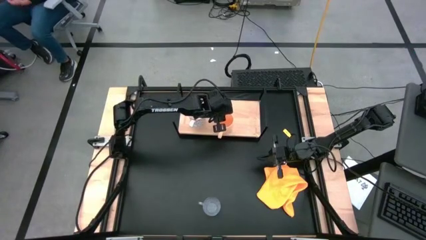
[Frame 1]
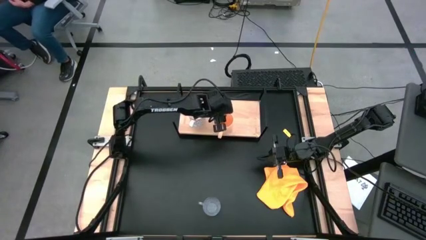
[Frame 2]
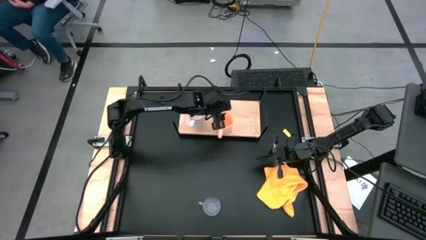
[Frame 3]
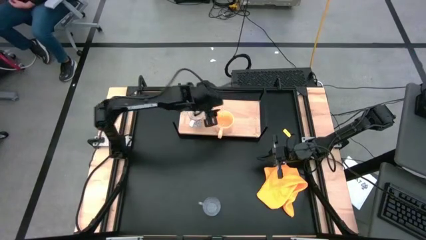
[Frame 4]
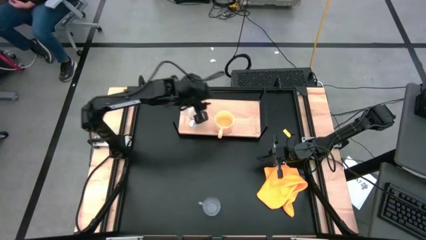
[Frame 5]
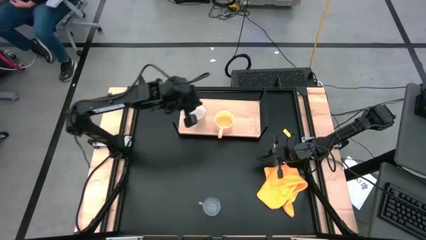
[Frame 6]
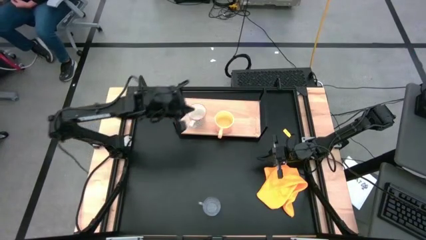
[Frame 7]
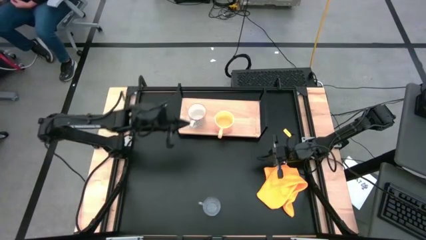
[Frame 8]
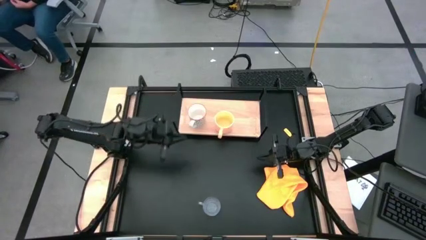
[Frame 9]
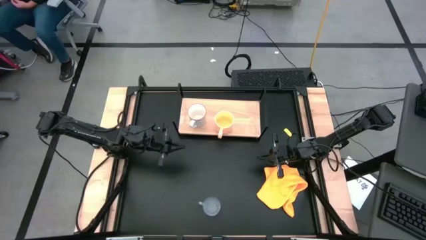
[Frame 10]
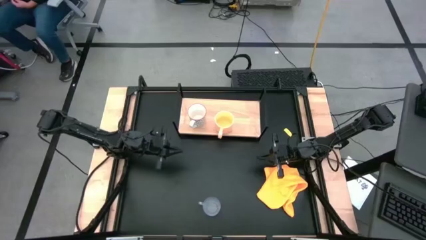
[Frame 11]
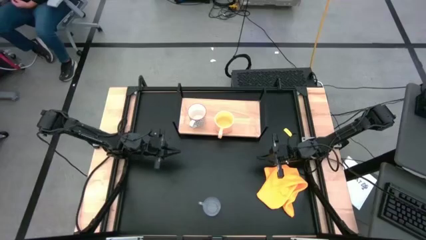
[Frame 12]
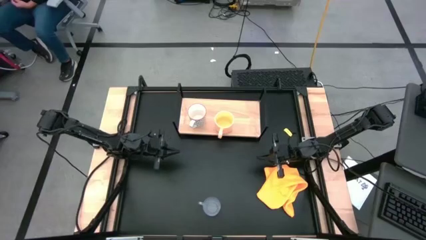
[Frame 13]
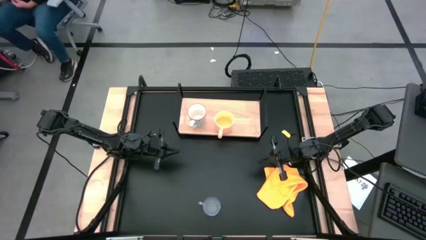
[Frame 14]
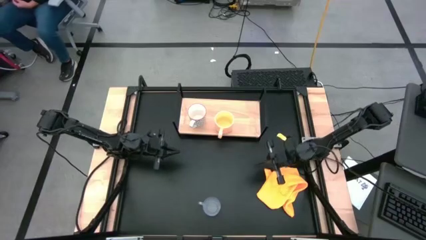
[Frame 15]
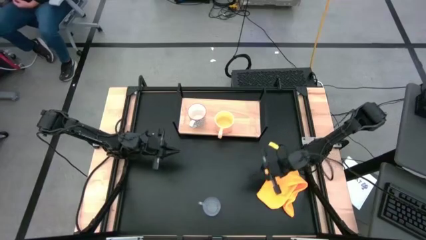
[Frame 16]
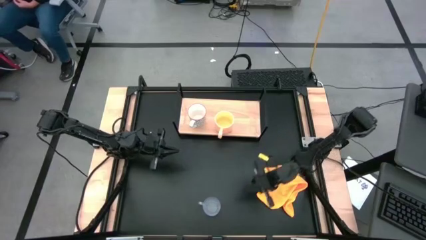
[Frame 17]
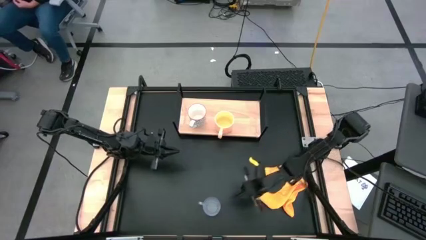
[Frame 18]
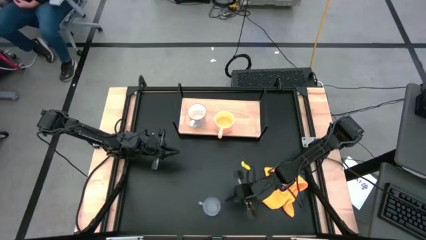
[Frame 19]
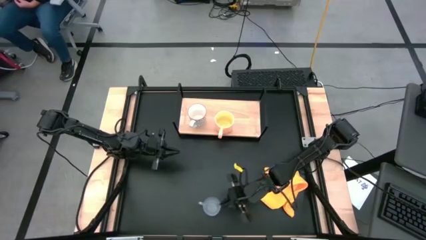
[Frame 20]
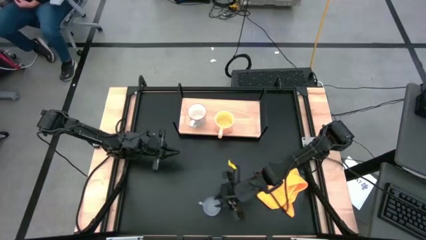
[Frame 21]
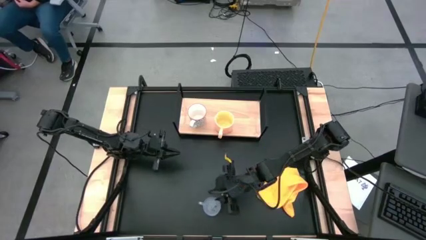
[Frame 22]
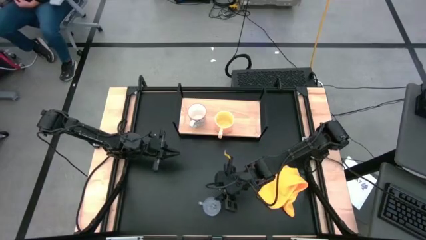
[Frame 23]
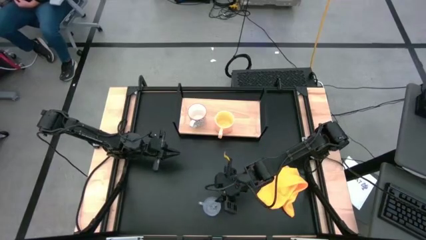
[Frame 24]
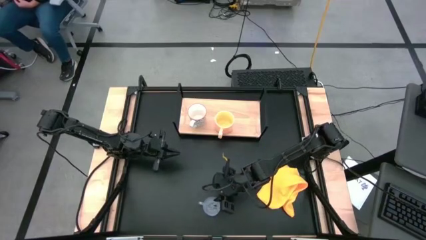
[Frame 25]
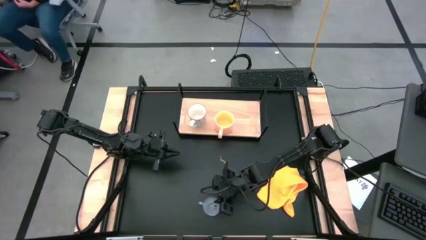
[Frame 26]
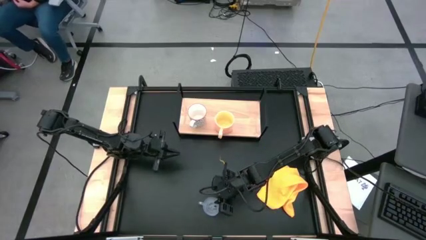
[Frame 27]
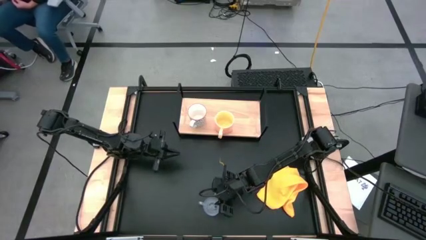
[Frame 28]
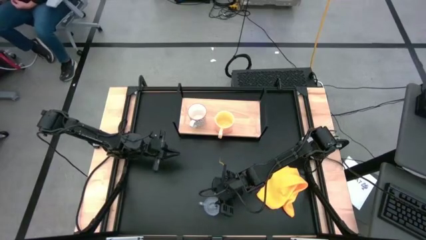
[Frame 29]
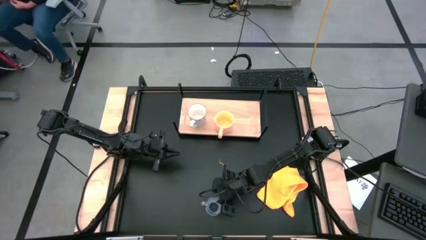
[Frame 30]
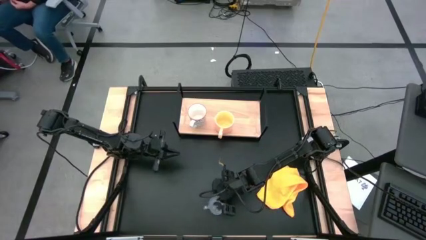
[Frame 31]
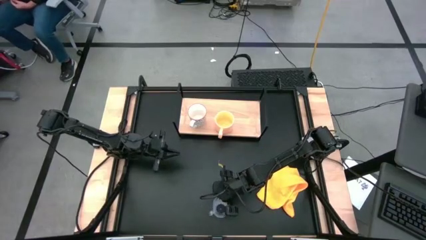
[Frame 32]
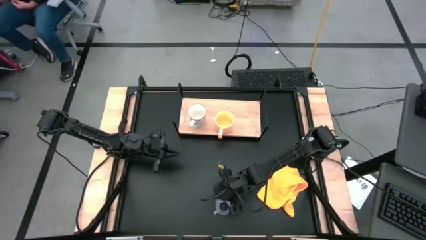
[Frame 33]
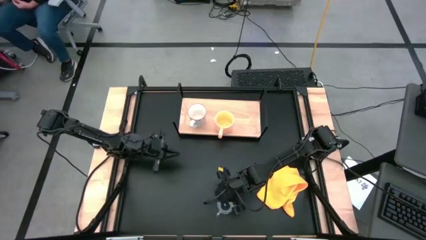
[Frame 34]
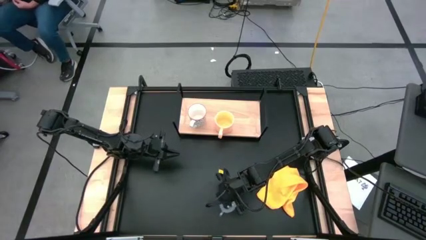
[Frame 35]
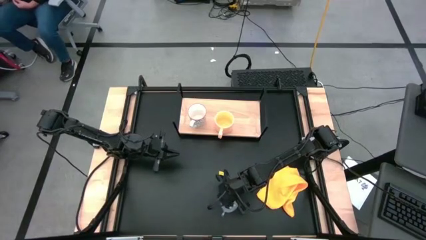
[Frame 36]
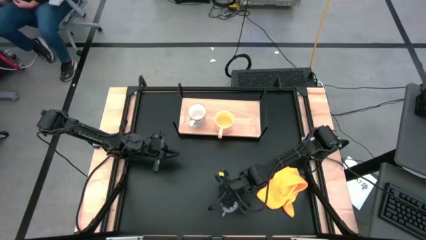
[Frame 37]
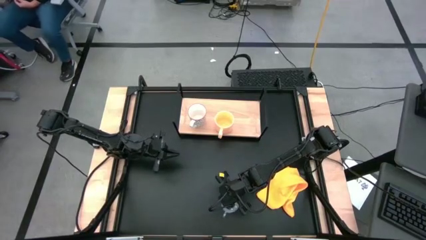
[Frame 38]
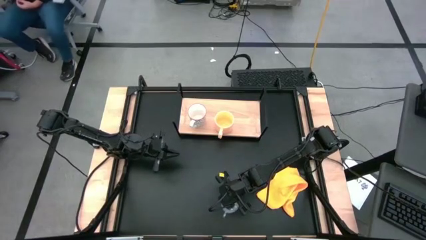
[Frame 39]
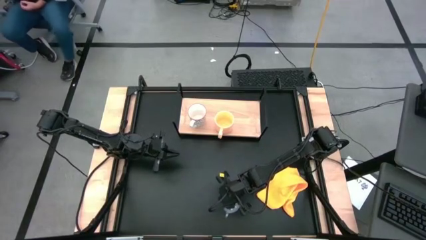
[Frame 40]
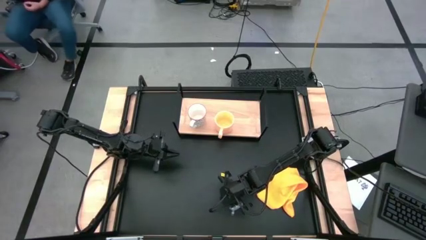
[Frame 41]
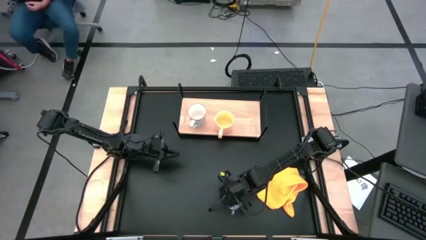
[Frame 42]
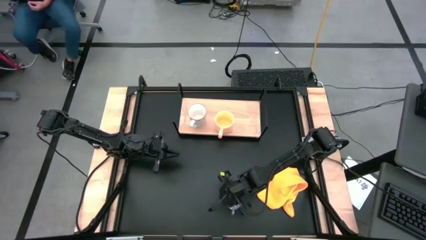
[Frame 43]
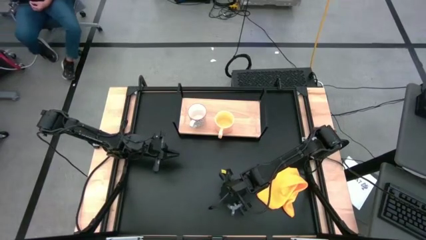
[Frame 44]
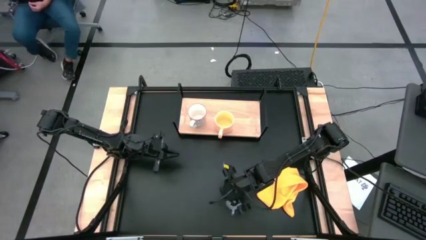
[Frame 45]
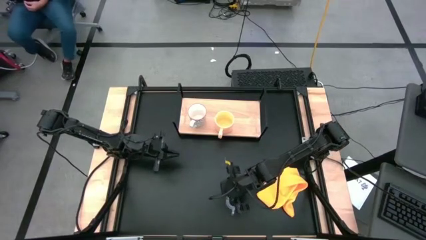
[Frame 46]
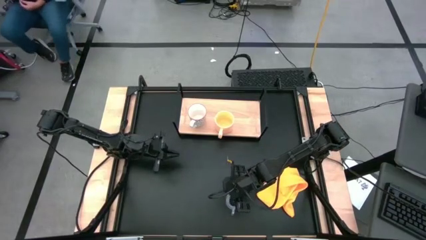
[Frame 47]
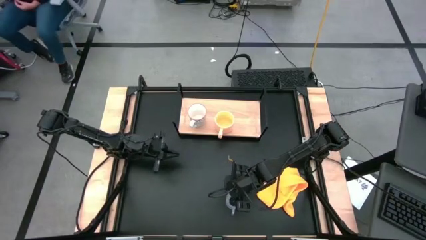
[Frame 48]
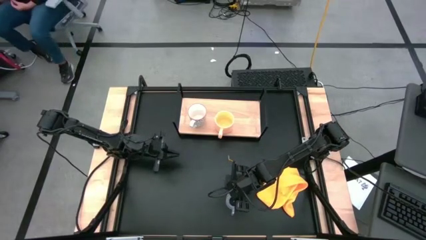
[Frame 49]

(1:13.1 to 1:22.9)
Task: Stack small to large cups/mugs on shelf
Put the transparent mug on the shelf

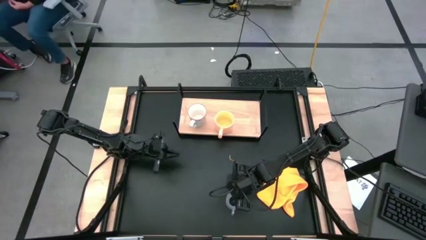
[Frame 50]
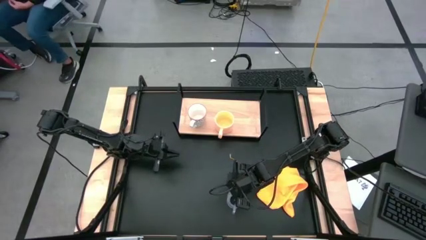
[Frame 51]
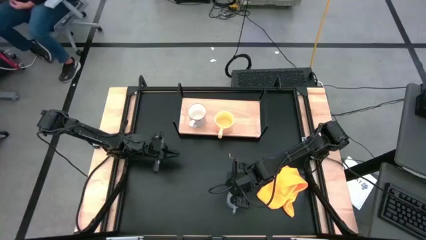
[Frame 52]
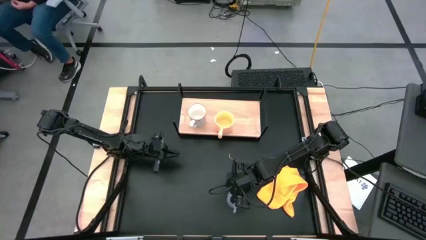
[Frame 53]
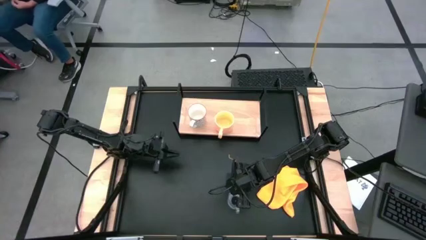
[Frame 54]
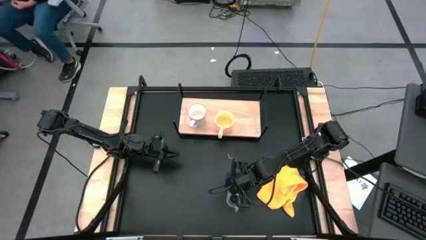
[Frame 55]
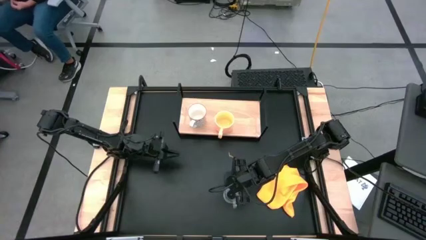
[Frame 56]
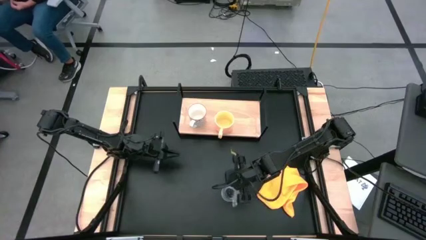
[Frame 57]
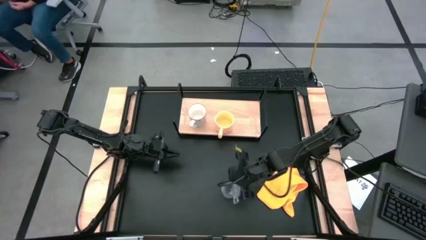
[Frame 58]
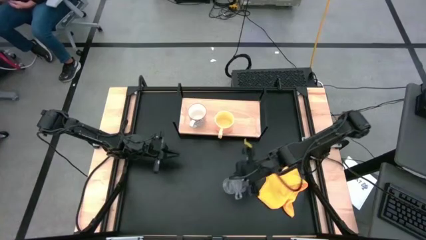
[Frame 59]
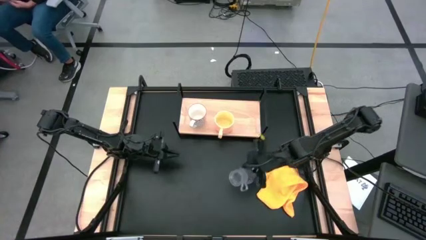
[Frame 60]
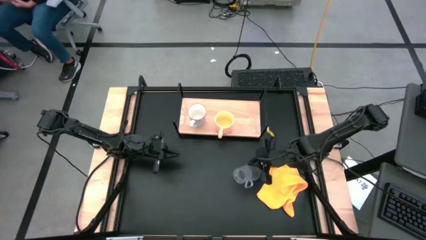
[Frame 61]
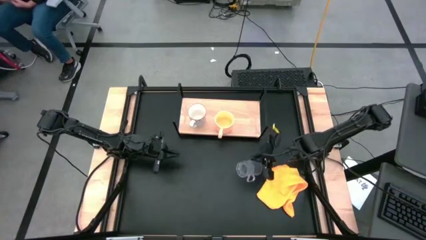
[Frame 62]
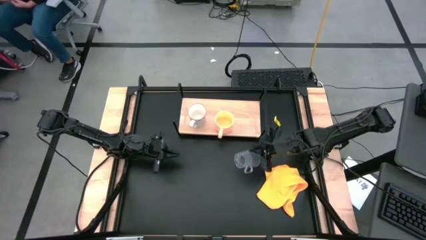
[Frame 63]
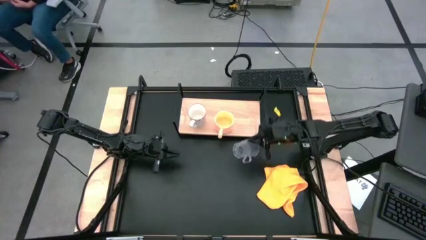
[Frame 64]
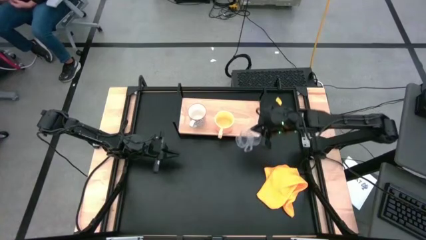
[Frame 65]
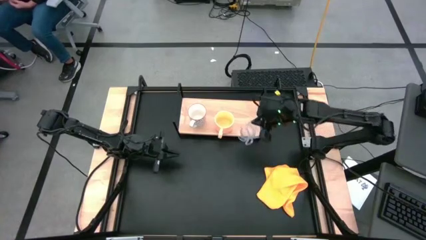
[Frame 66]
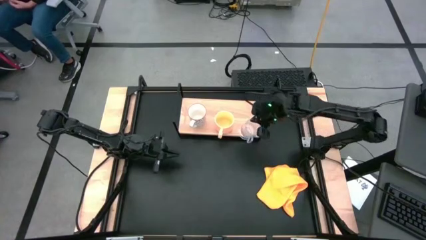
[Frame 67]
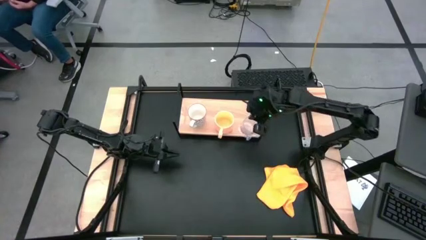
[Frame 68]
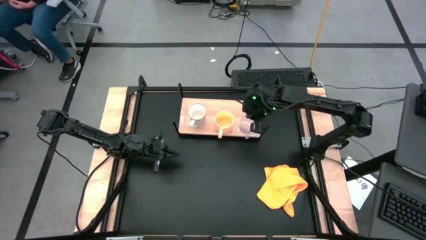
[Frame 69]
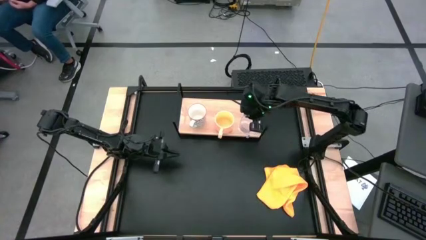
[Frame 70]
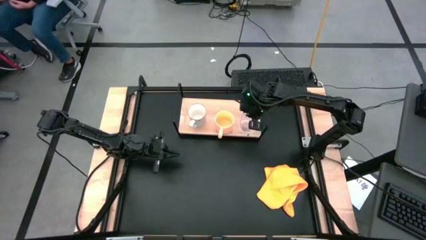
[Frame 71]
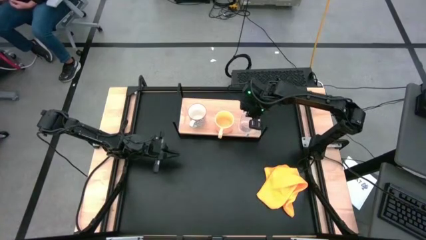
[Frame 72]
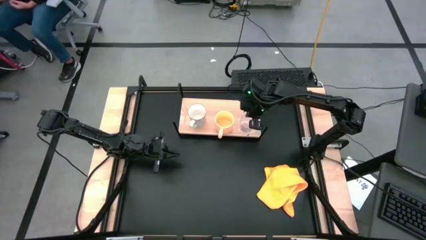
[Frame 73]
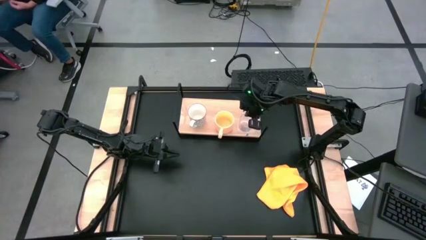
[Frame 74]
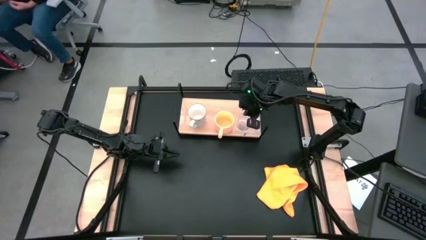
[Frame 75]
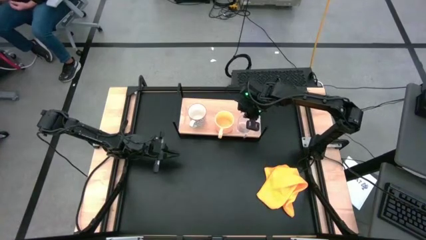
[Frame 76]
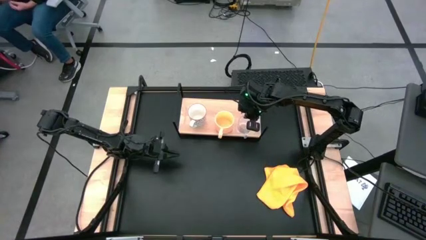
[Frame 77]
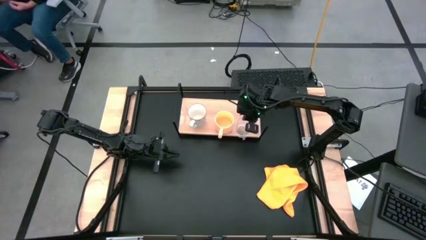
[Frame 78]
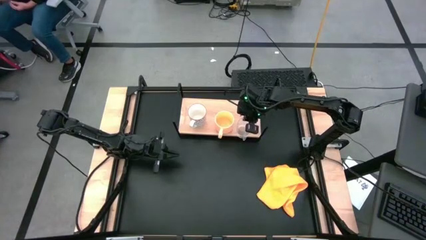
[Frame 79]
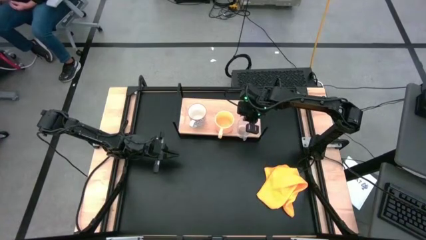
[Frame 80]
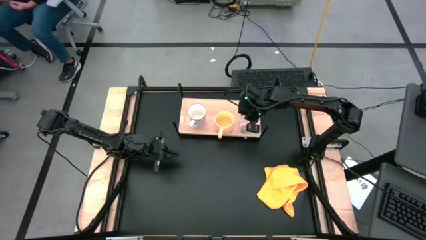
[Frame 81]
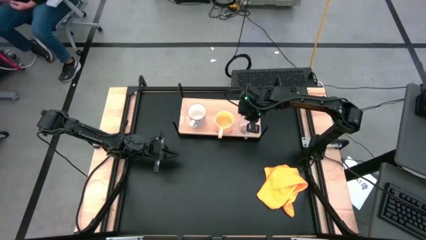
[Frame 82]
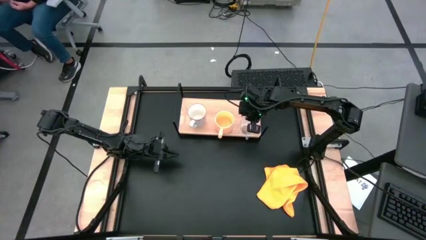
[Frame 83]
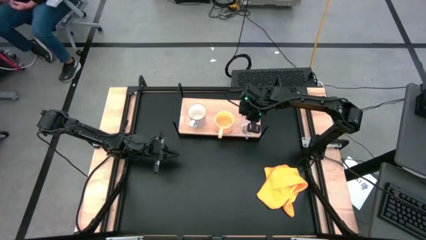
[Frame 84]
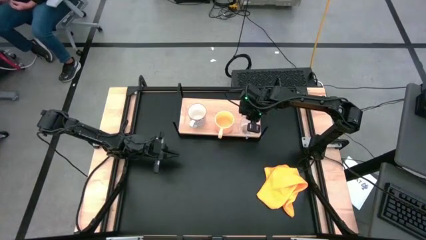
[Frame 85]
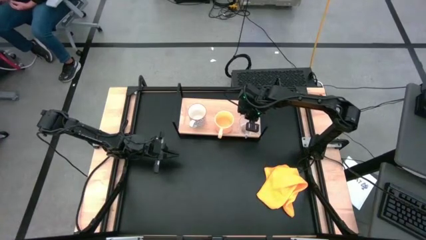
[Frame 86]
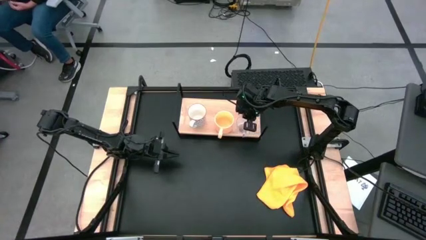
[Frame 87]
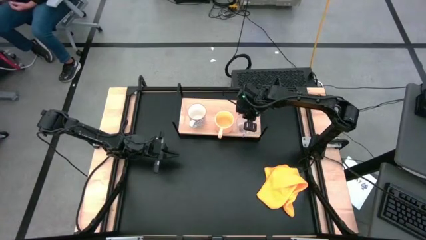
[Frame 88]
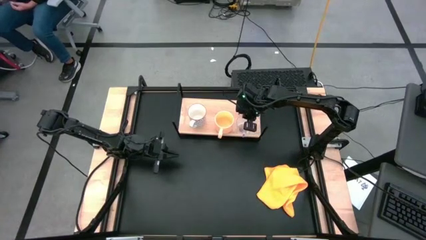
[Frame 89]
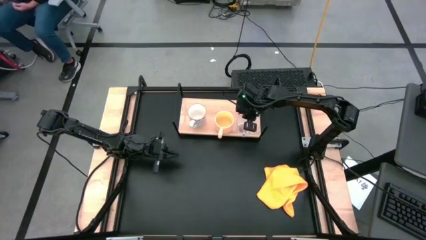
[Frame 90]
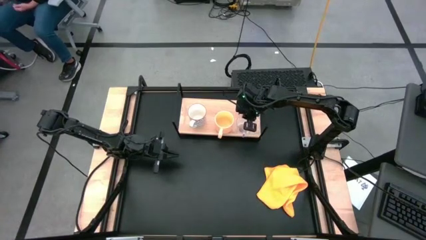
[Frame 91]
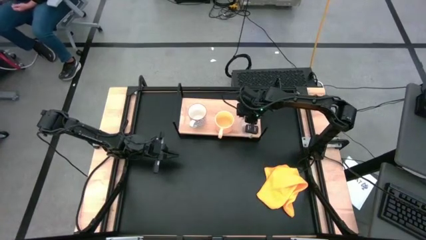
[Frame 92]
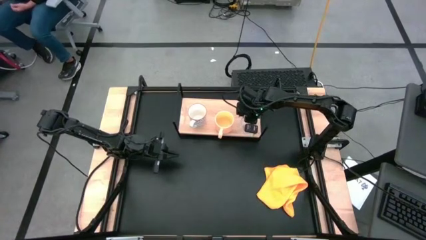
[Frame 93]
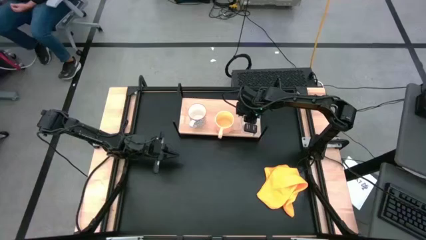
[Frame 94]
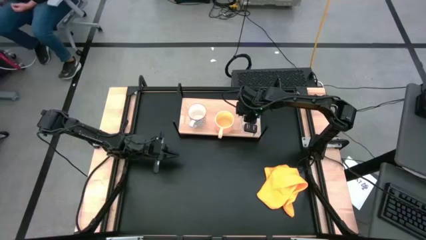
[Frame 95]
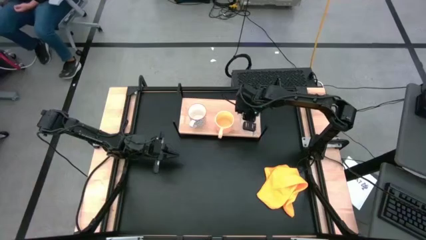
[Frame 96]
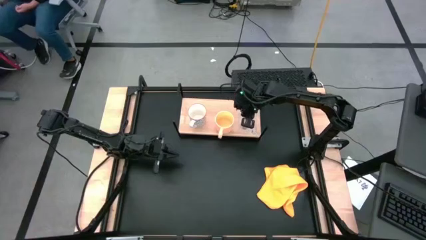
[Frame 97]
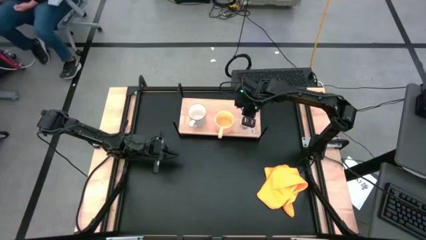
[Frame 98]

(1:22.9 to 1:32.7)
Put the transparent mug on the shelf
